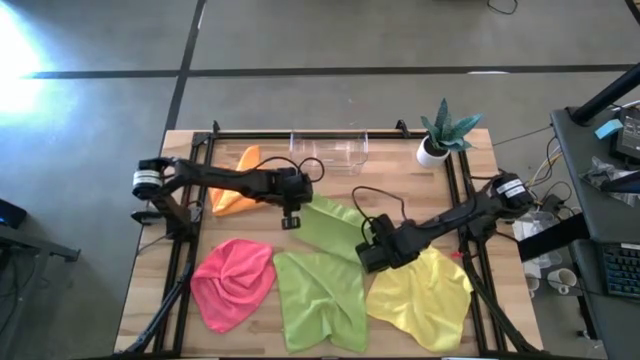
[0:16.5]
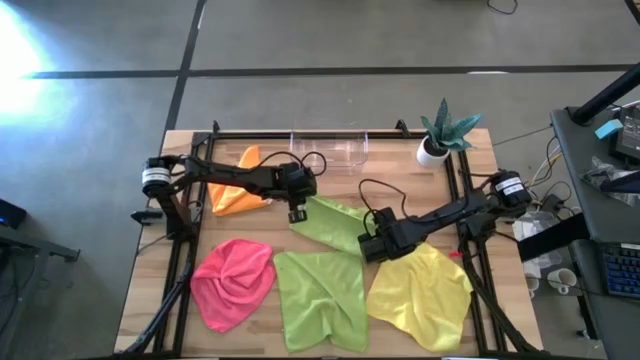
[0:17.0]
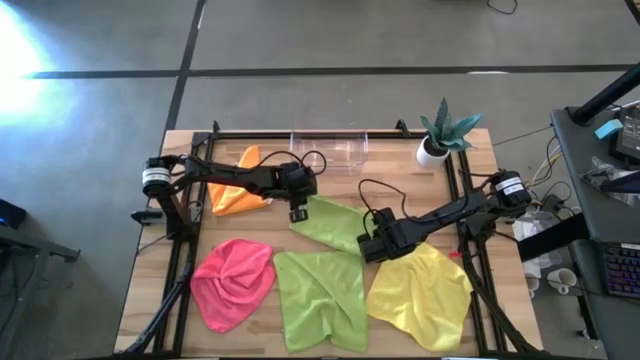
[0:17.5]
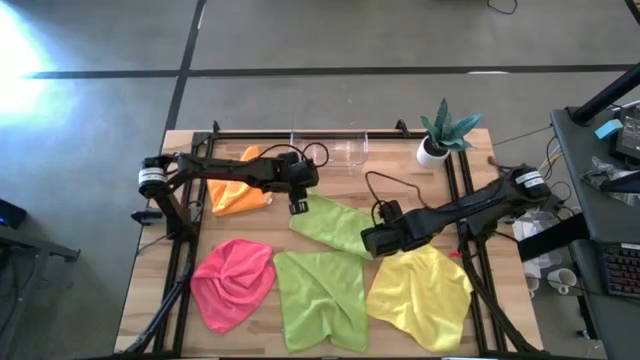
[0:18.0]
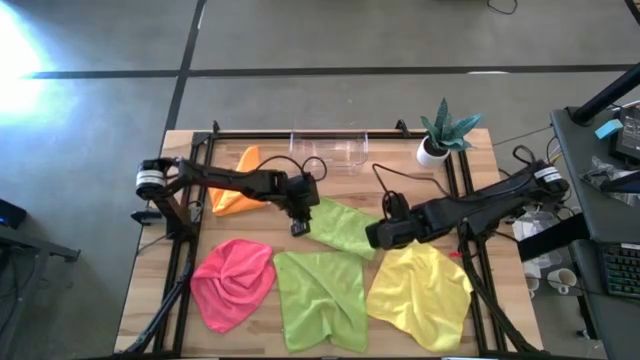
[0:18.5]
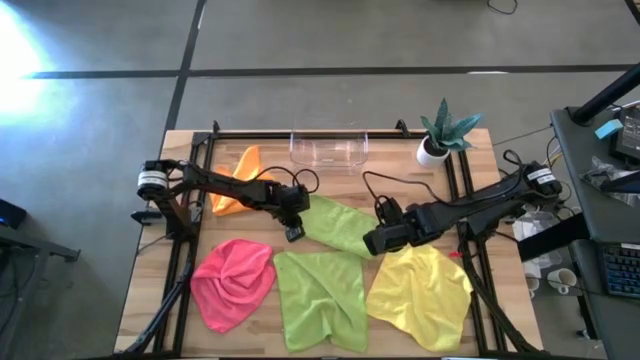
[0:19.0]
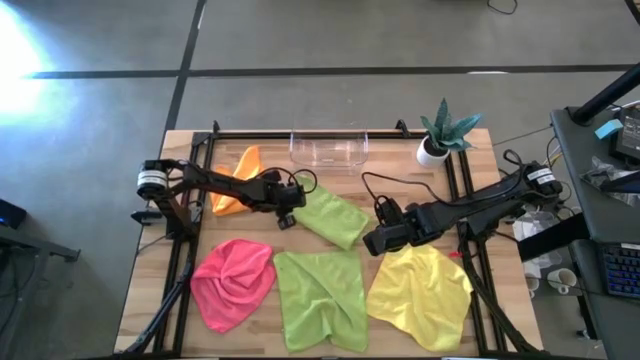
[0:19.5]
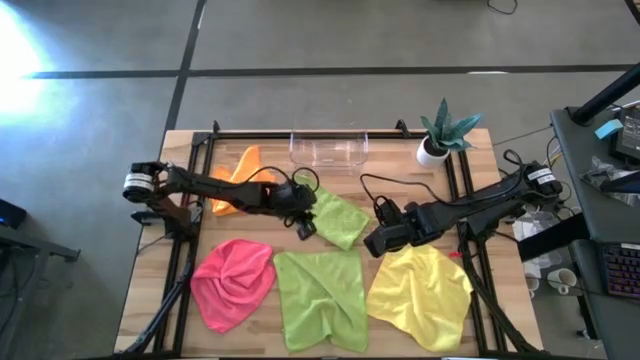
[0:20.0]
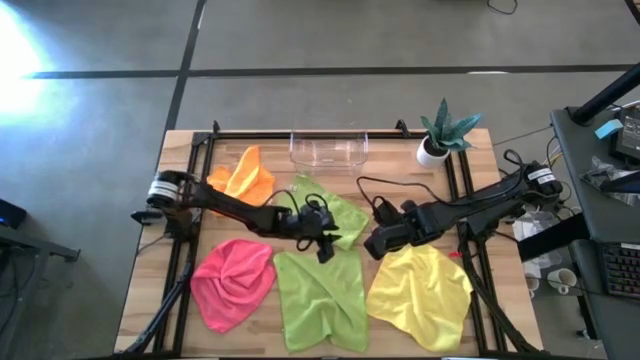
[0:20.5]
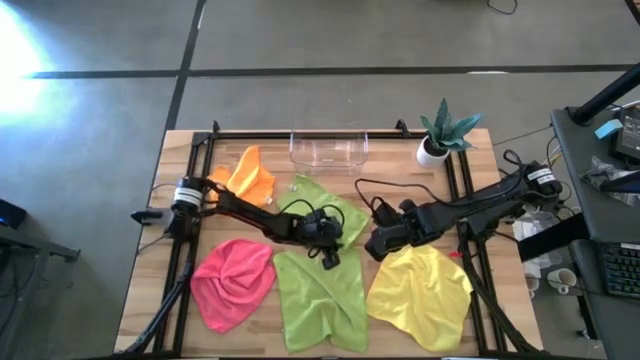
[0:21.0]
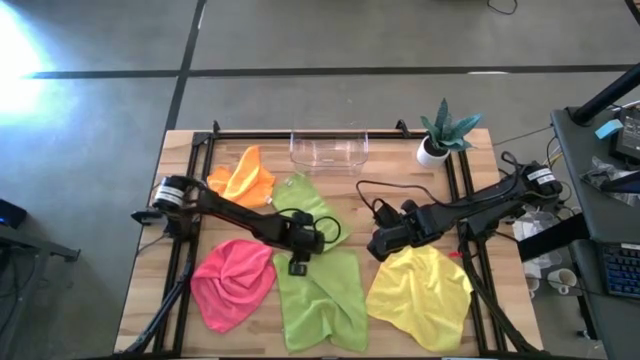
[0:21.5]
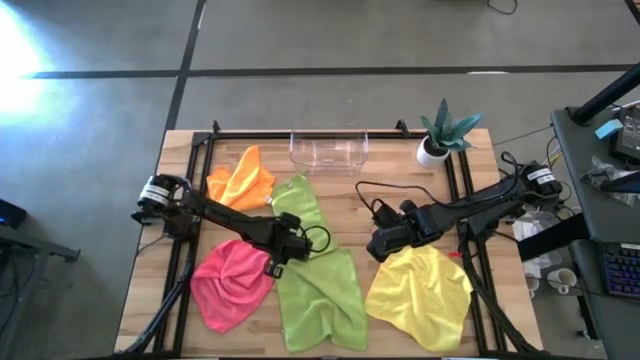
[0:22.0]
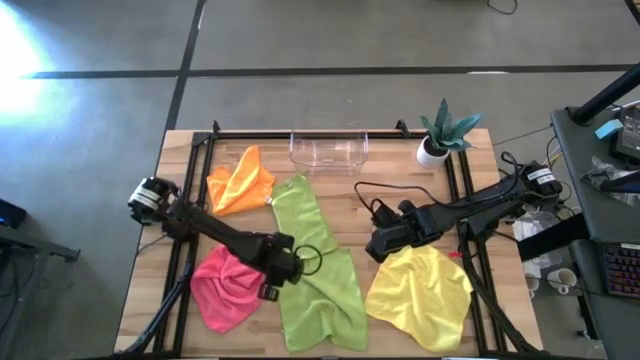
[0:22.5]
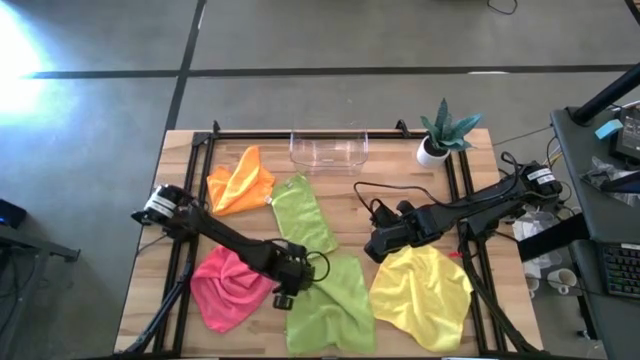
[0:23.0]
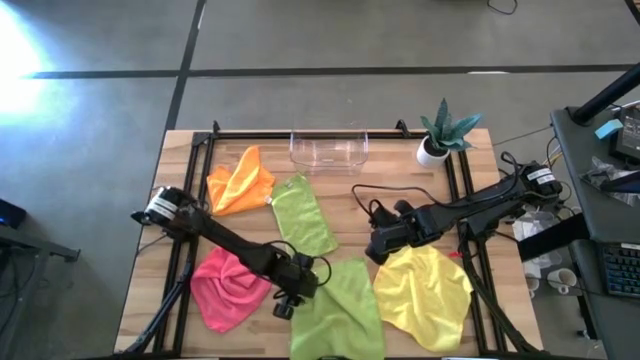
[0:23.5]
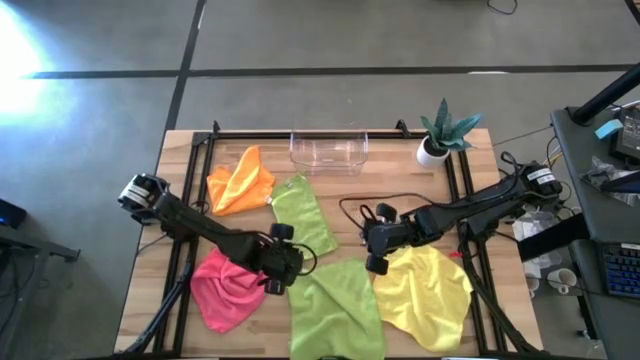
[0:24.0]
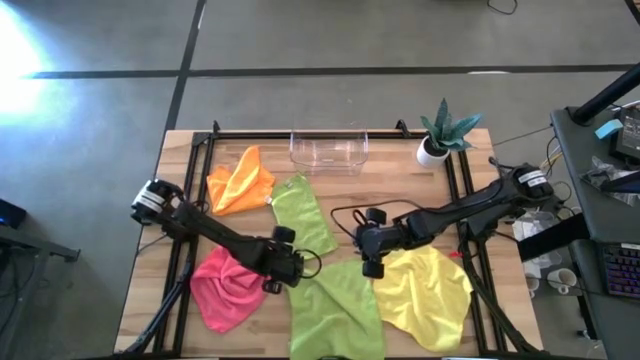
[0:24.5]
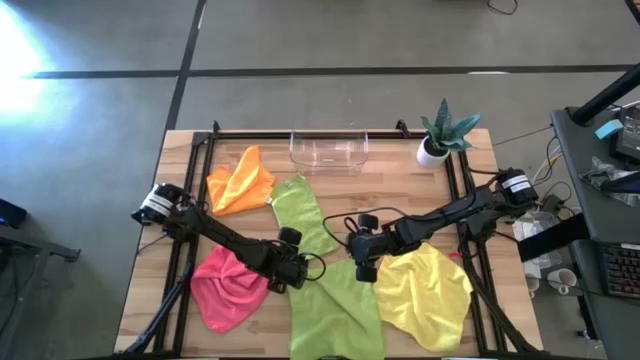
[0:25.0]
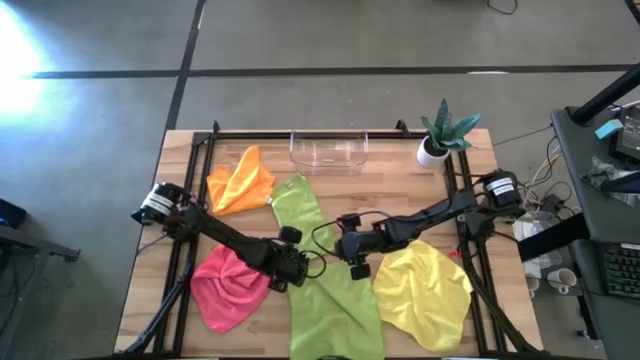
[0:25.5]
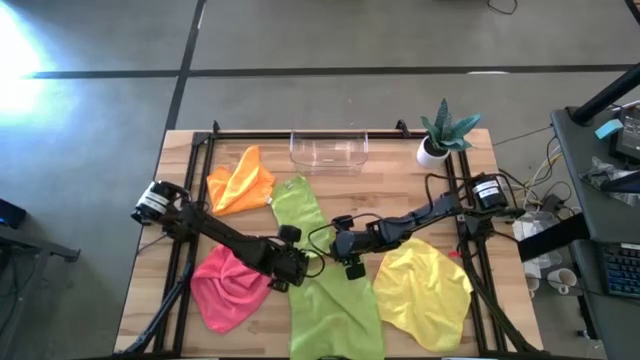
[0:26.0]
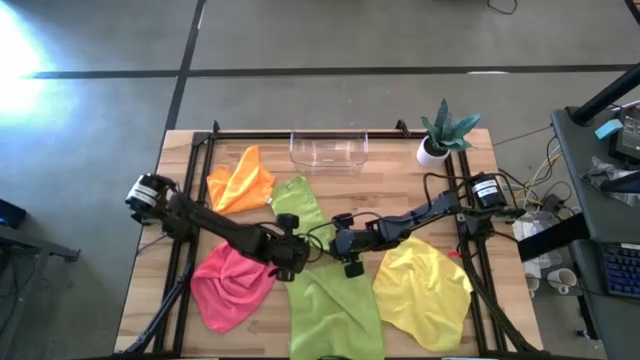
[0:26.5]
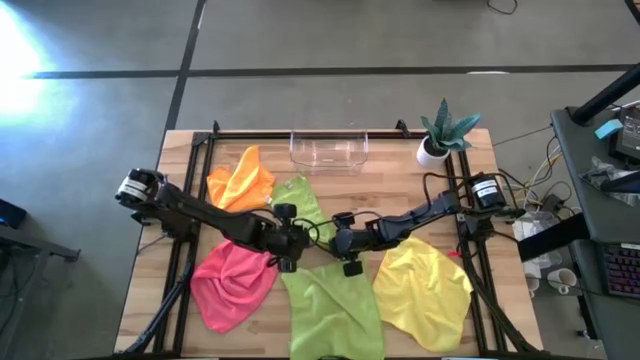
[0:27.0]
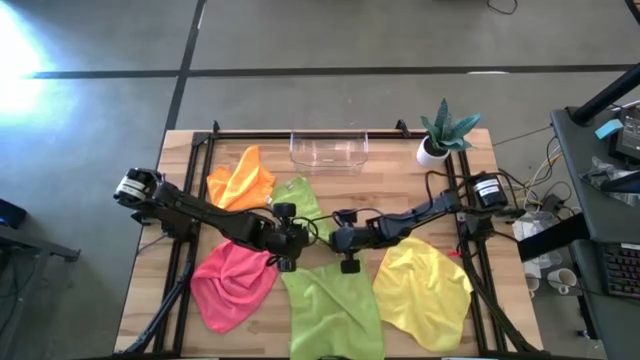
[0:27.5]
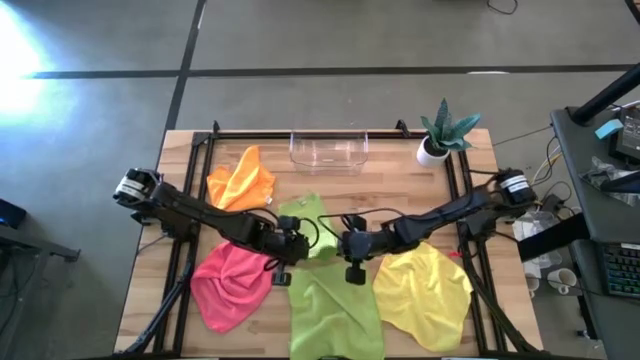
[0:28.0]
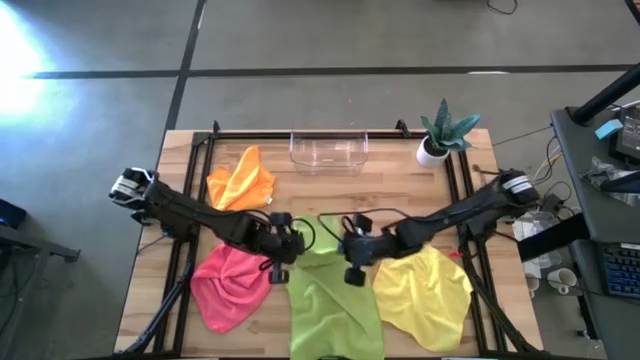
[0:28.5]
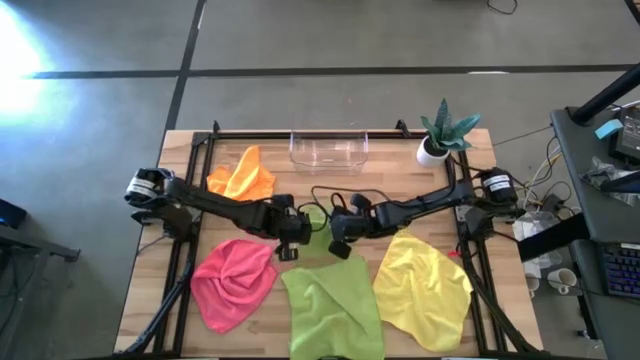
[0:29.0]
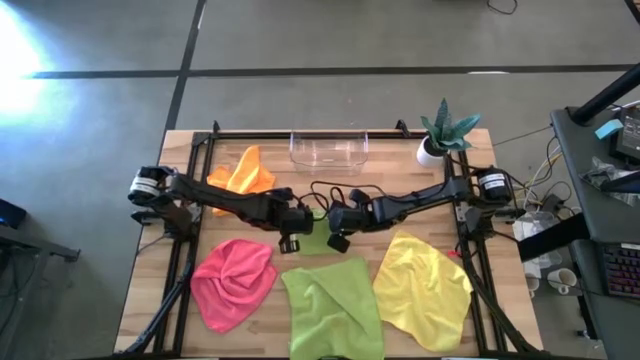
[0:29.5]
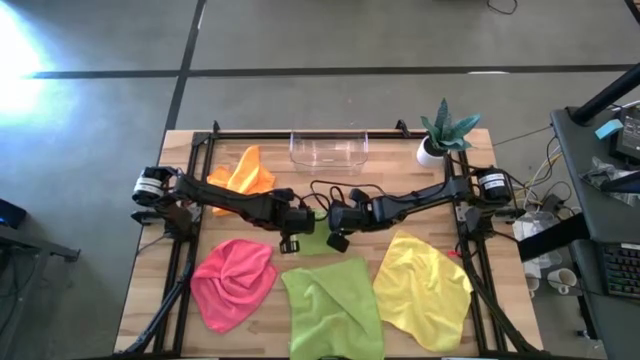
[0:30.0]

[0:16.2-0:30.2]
Task: Fold microfiber towels
Fold the top green microfiber towel on the table

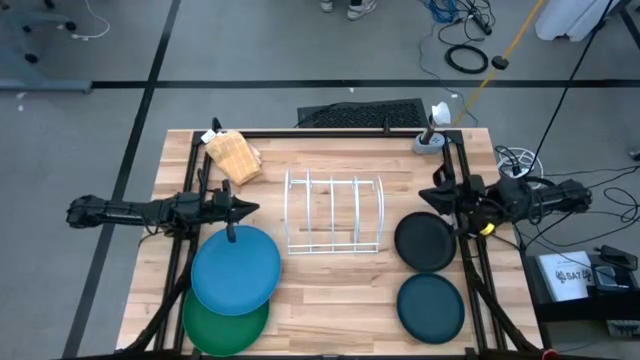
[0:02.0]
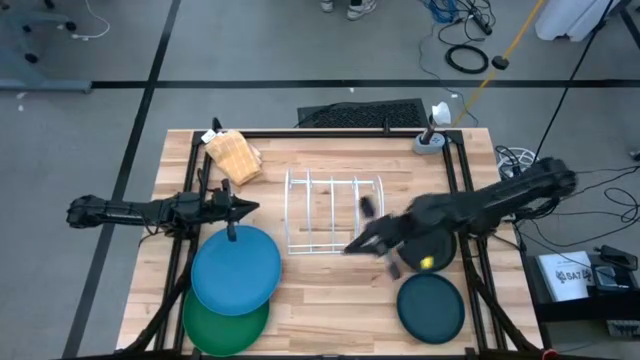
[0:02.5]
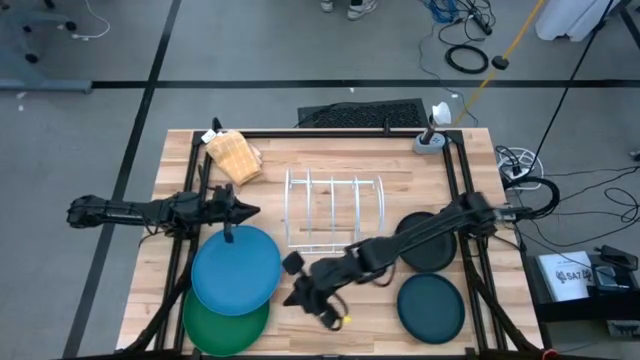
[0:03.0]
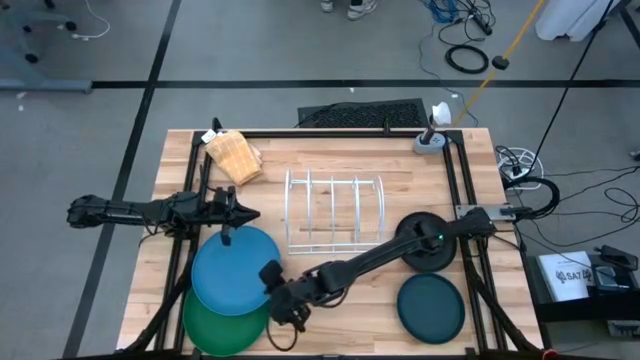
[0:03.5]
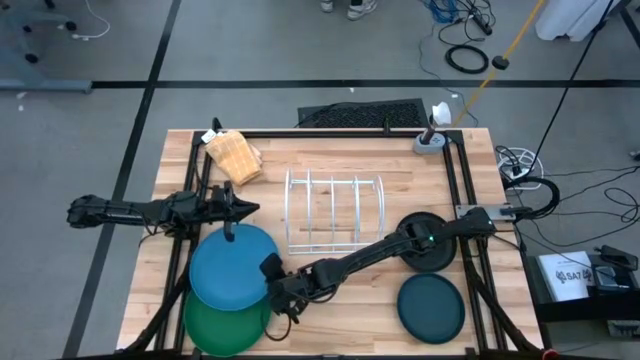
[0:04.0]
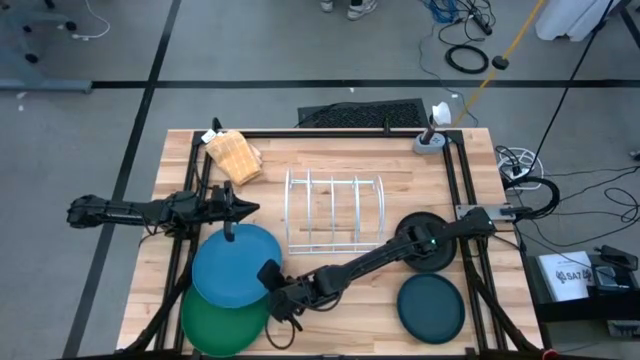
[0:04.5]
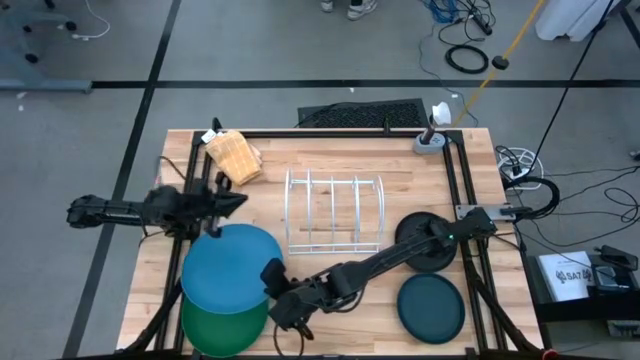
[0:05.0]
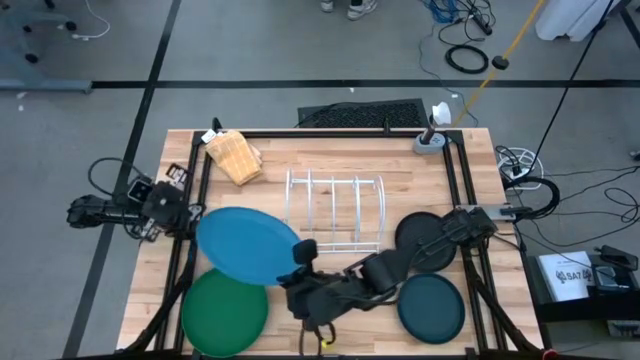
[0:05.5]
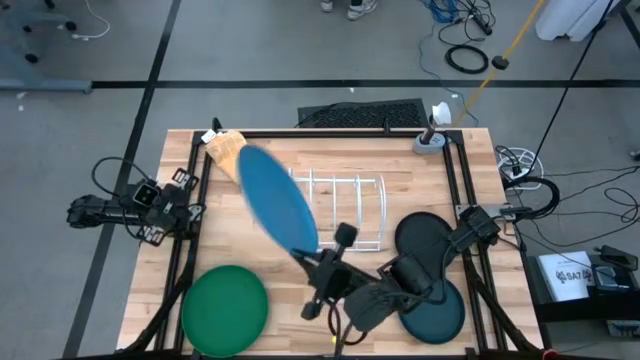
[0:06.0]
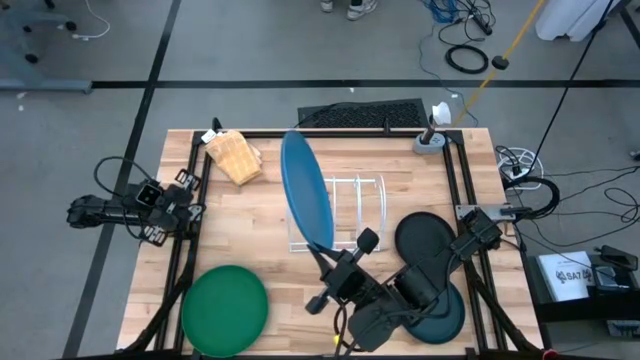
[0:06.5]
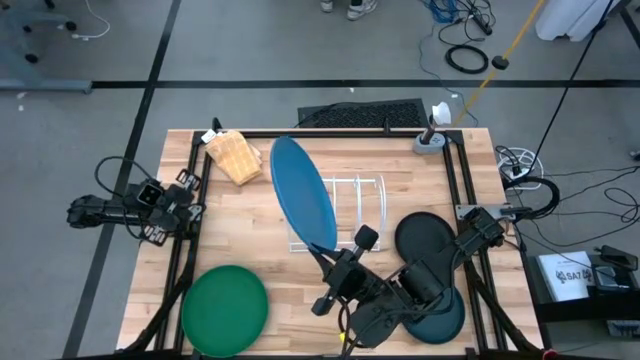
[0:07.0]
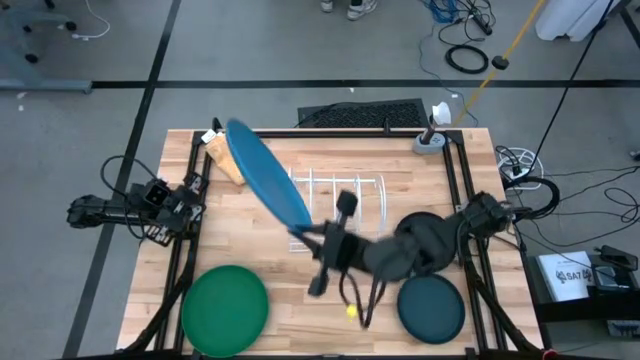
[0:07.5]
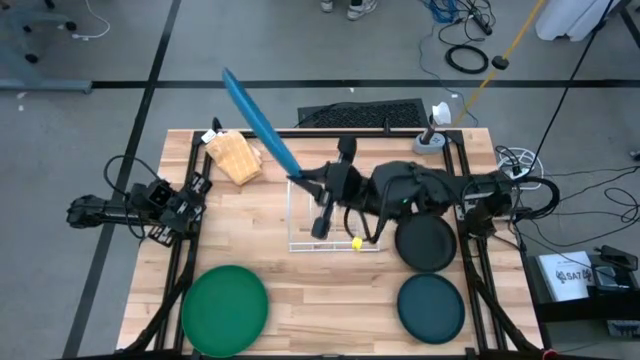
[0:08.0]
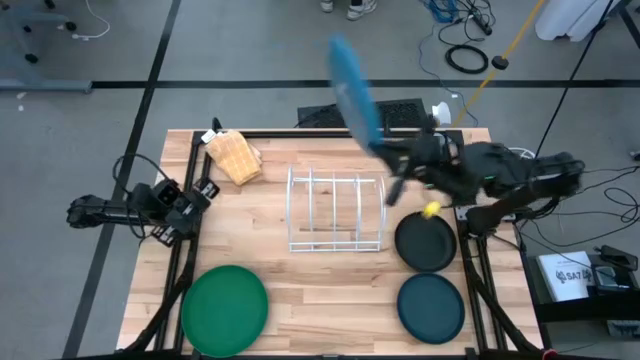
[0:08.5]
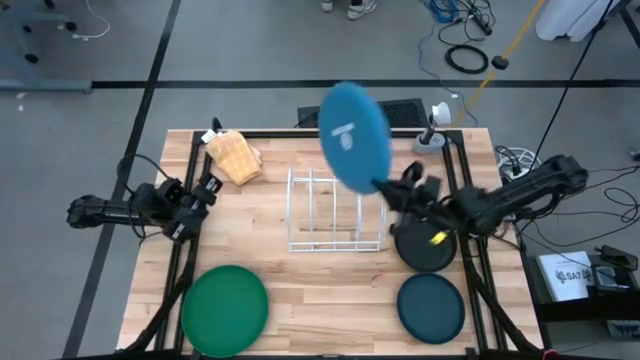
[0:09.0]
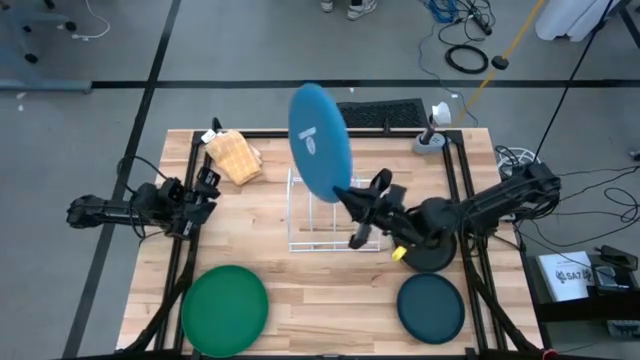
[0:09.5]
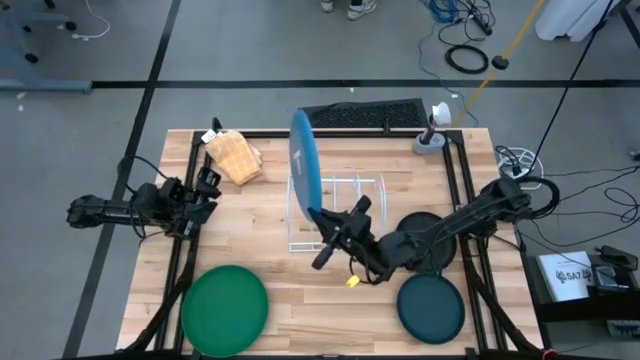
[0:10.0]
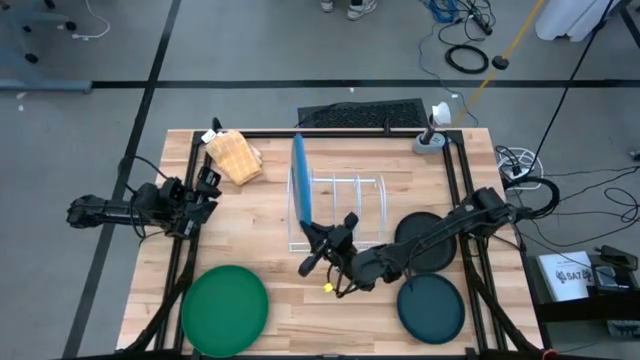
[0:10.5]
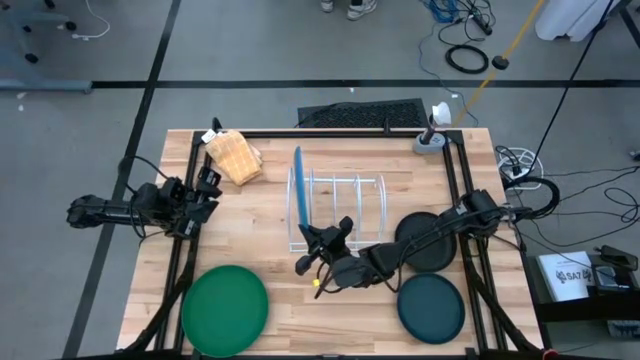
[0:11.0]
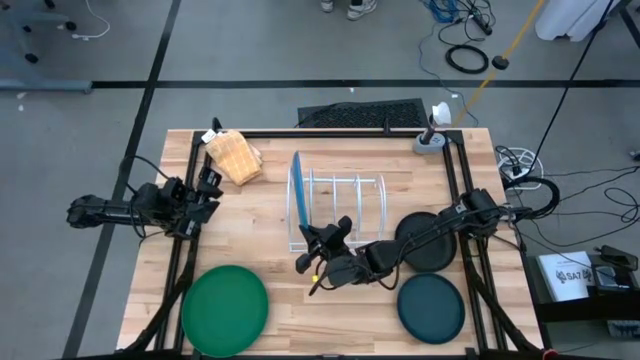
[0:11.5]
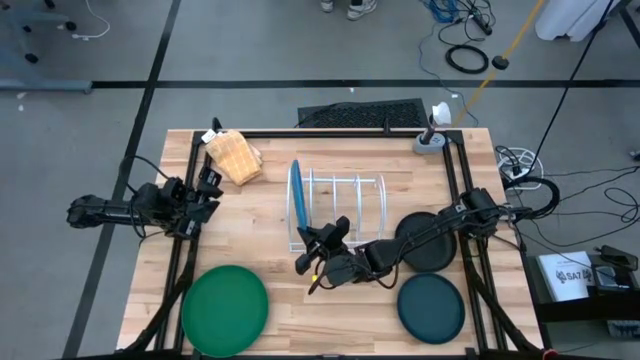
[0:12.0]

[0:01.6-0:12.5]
Task: Sort dishes
Put the light blue plate in the dishwasher rack
